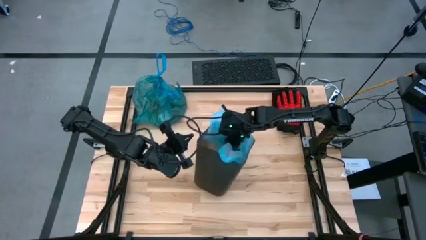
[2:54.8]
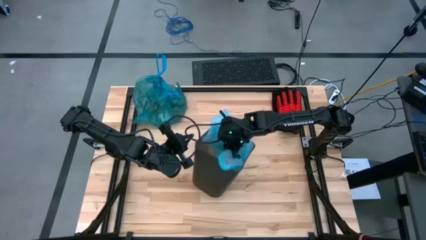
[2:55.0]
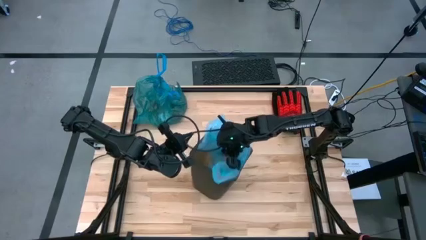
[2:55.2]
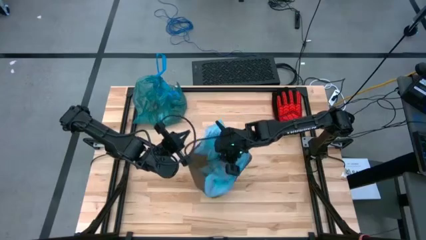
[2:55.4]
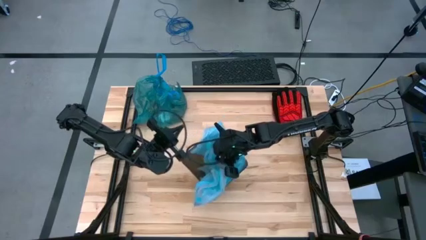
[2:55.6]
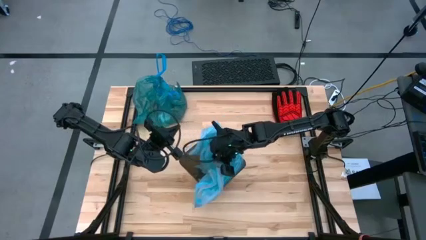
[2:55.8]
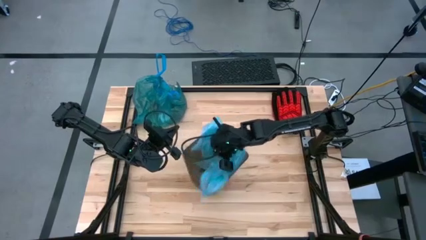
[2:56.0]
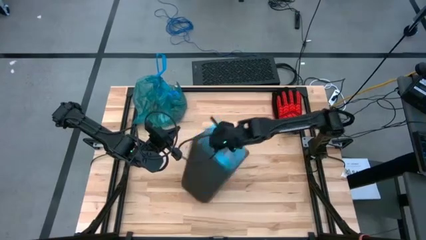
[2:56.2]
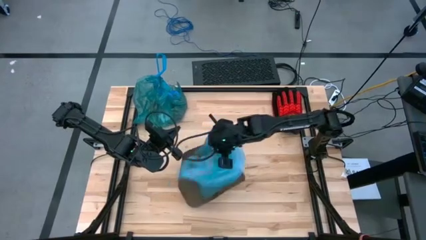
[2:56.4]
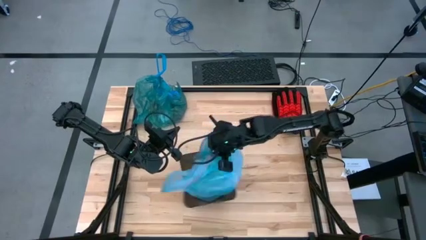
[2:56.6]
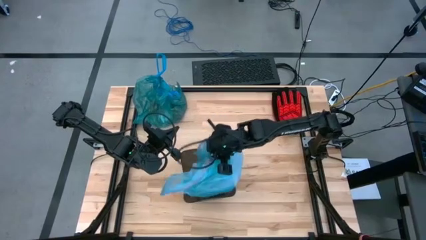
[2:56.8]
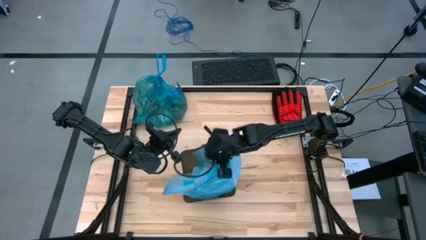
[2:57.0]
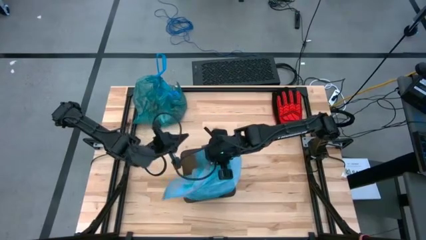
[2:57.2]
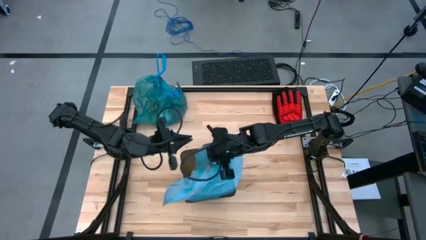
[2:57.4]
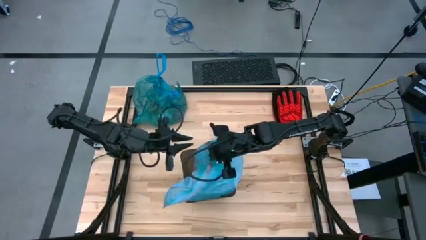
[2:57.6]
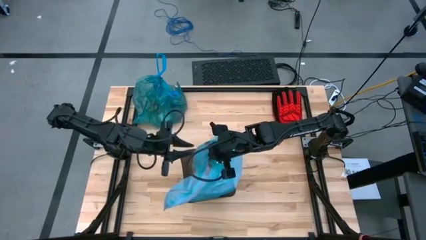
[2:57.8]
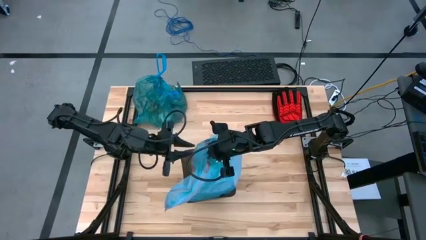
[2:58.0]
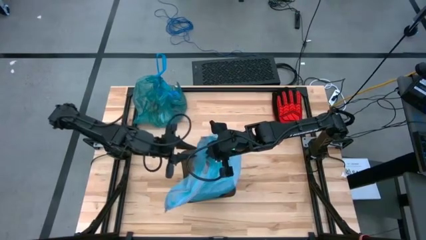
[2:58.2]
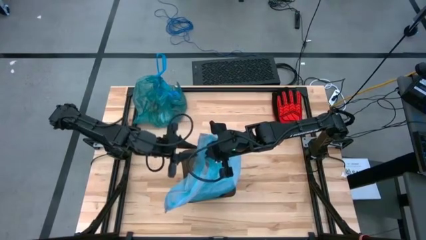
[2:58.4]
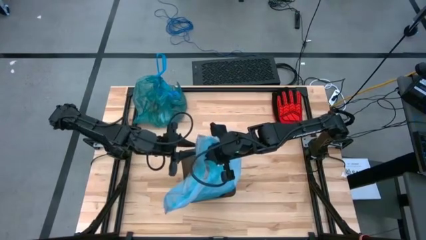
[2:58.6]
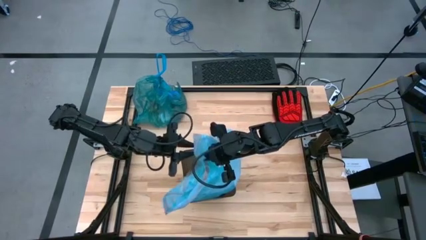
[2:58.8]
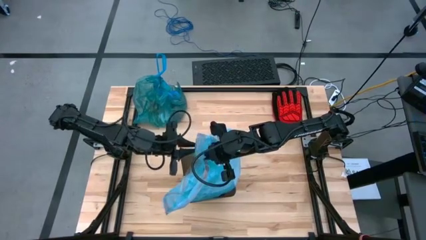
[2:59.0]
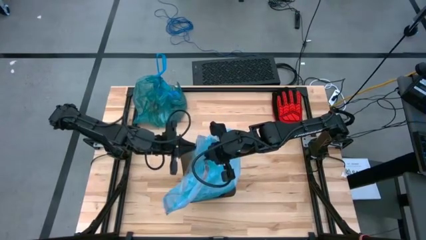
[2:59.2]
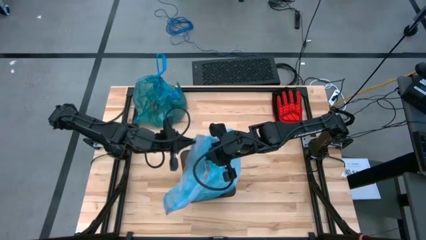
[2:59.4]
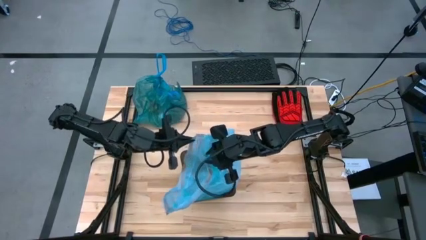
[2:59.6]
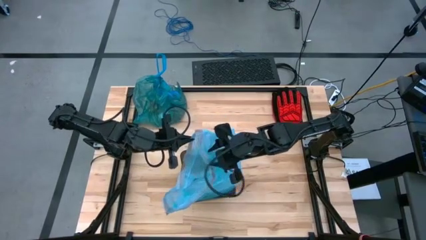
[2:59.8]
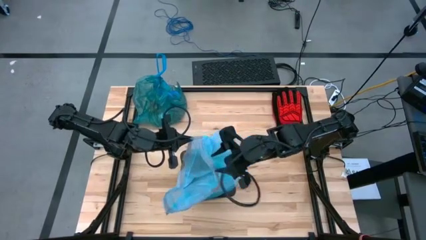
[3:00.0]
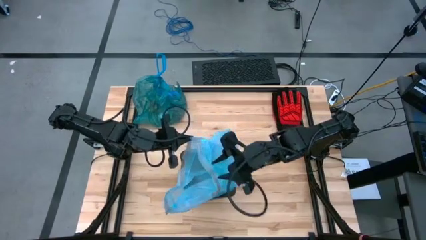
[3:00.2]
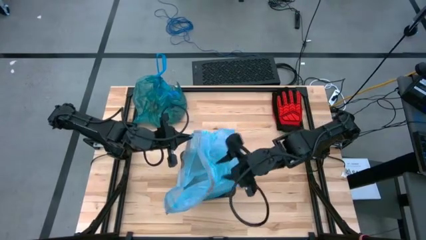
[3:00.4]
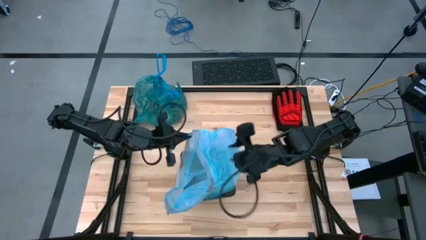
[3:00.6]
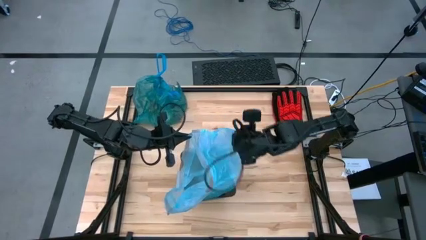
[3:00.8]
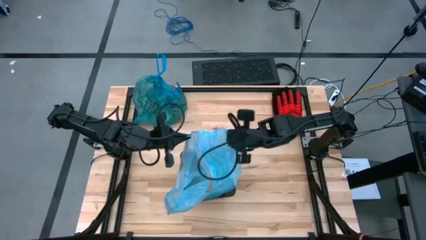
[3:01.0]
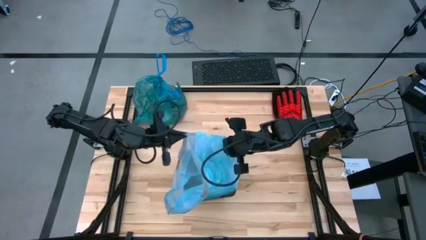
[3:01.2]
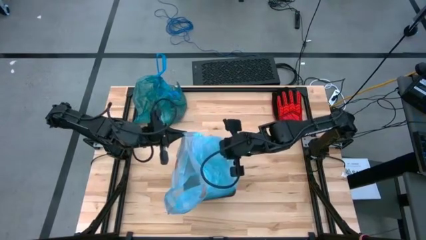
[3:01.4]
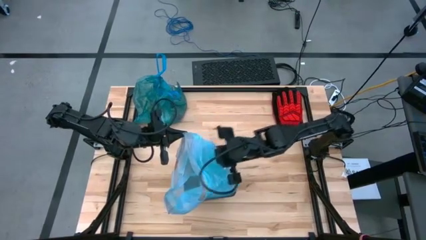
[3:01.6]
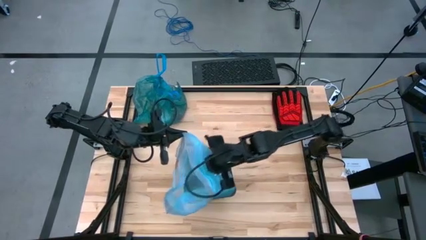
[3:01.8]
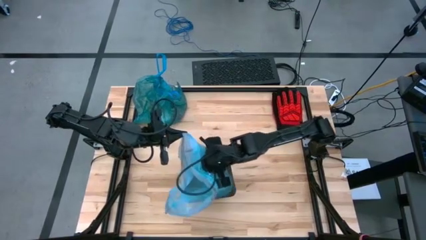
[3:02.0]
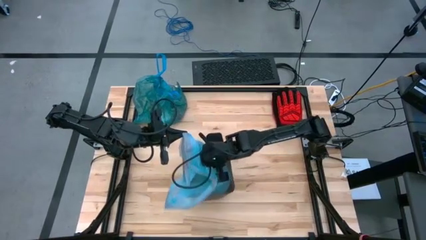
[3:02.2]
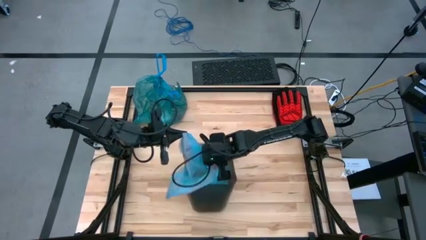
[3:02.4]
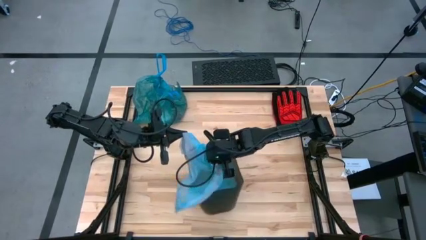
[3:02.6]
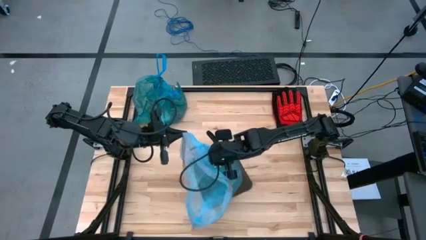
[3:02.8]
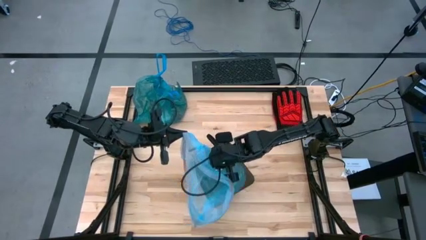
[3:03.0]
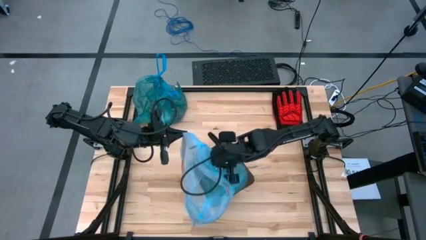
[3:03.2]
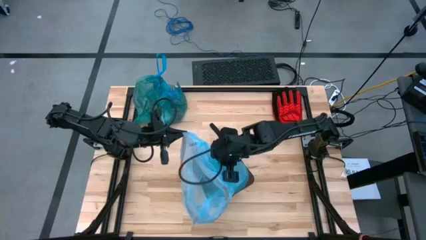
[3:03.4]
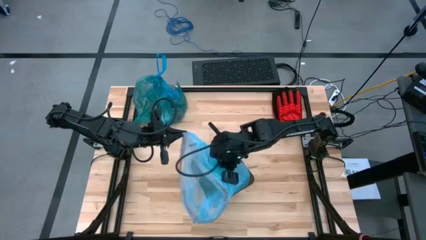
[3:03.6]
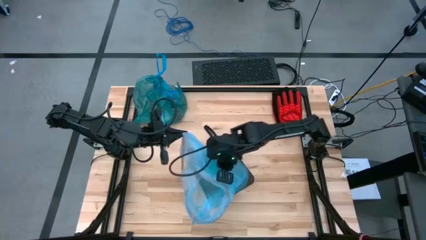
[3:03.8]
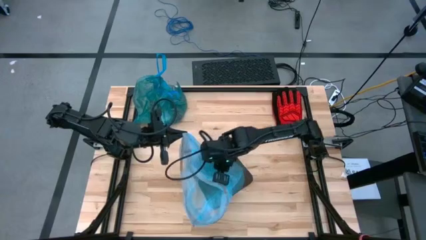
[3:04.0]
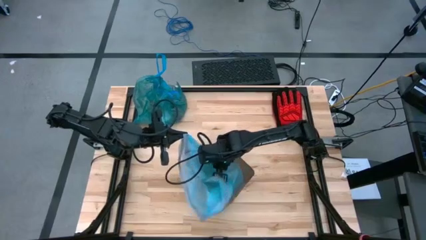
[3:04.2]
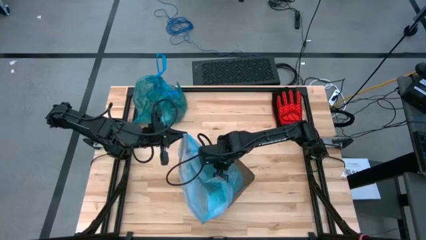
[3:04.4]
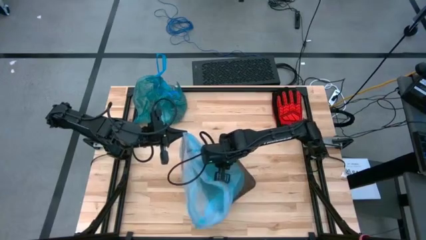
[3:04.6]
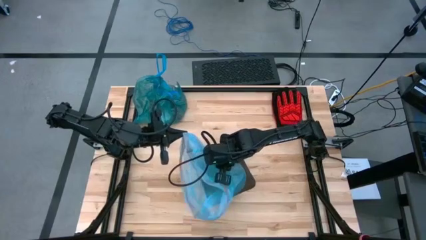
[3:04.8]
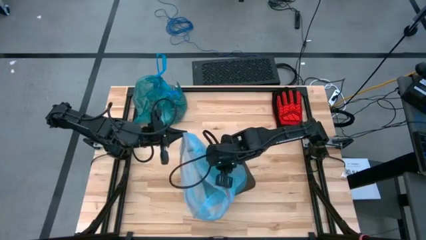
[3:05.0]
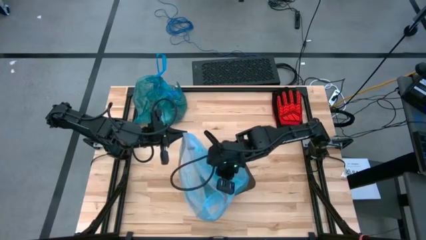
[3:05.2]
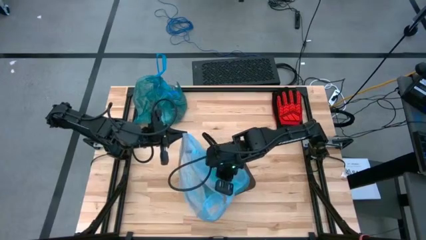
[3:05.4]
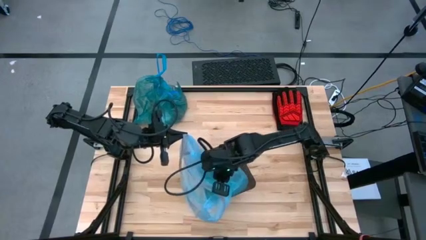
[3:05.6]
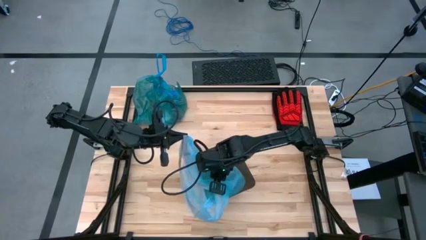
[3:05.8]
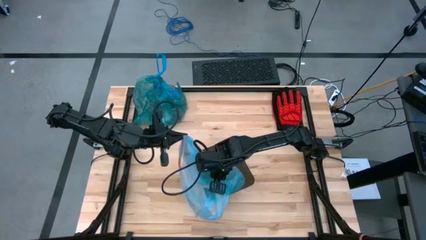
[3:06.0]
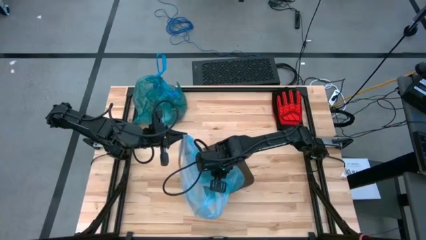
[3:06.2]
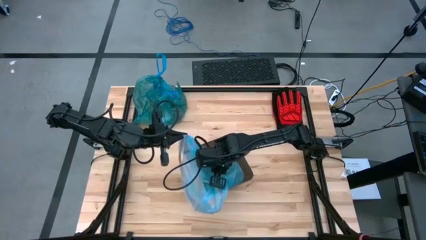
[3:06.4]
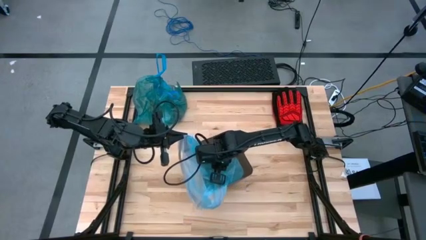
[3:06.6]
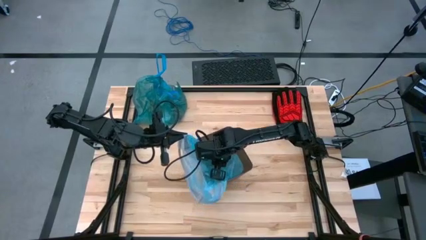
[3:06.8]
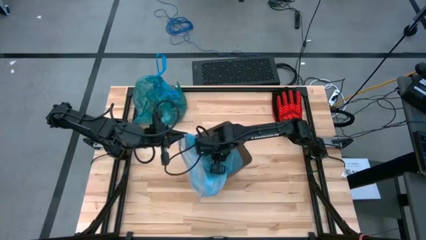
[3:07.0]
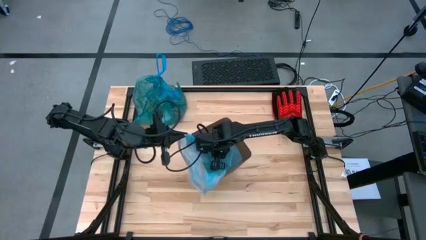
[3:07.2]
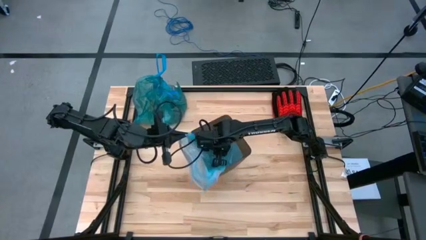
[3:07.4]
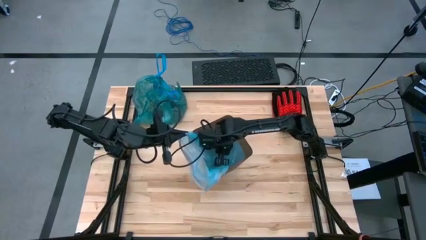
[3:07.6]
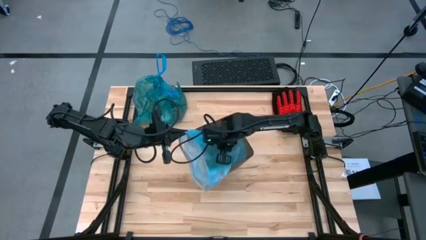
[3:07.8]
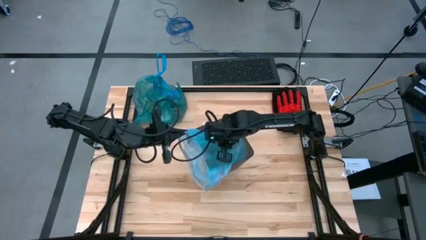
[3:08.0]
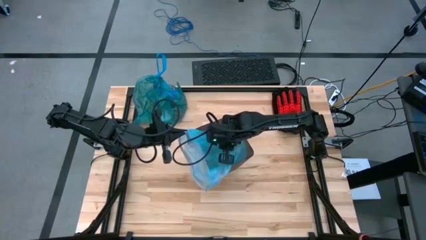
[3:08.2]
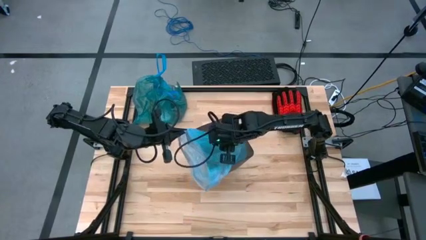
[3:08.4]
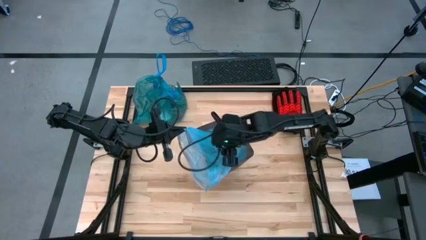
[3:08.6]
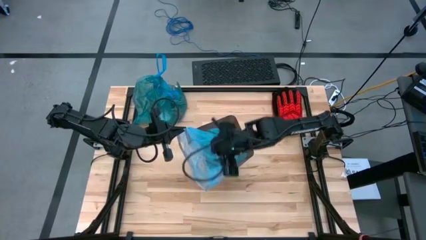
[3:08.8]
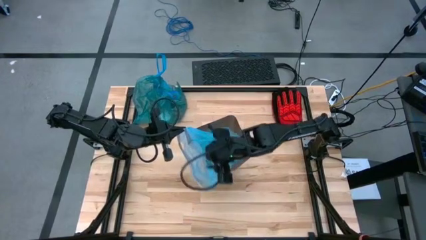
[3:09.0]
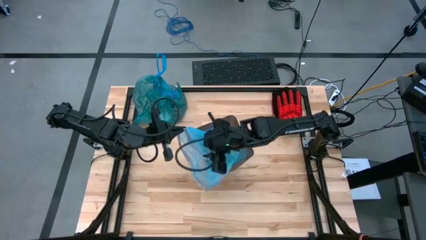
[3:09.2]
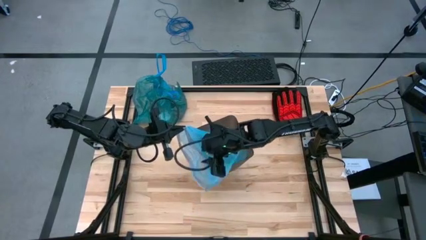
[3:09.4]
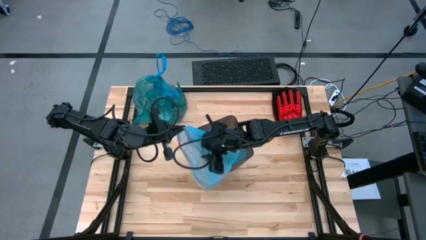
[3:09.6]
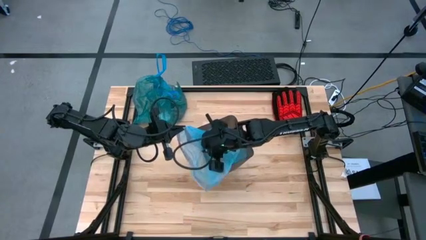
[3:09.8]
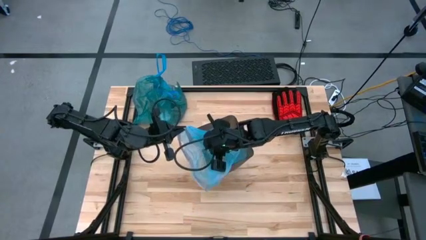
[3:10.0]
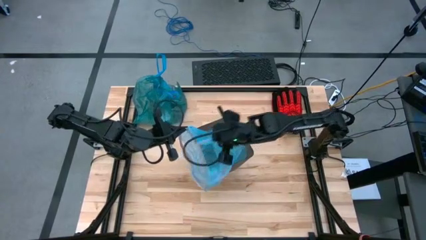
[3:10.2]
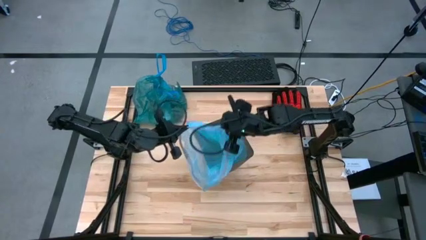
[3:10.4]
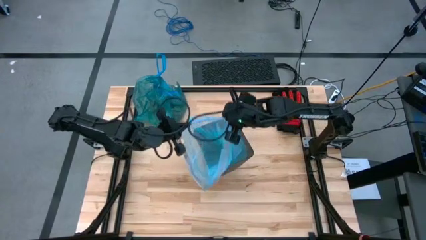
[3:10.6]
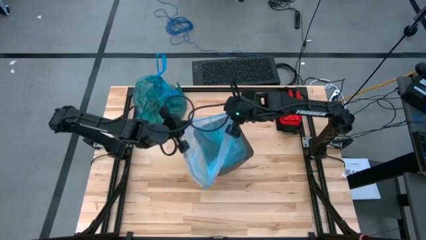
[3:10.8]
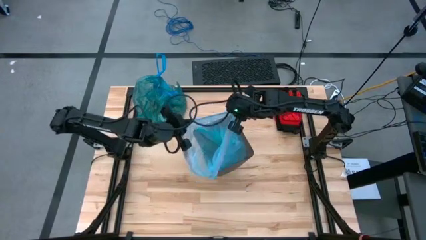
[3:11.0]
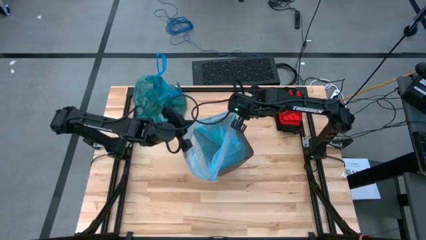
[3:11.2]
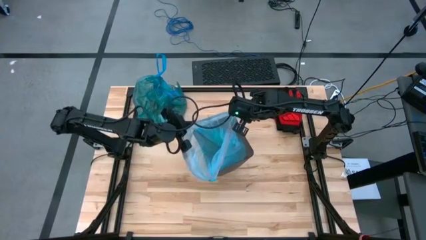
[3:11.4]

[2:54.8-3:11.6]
Task: place trash/remove bag and relplace
Insert the blue trash bag into the trash bin
